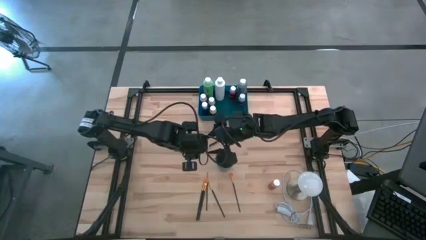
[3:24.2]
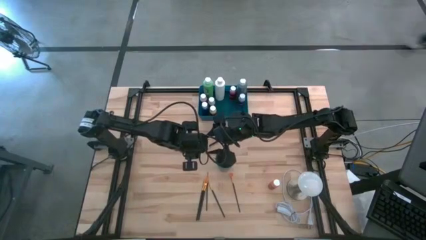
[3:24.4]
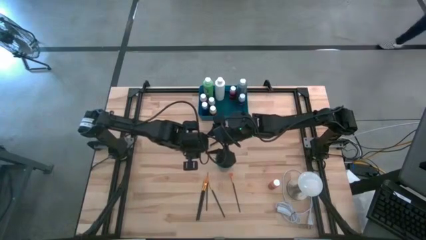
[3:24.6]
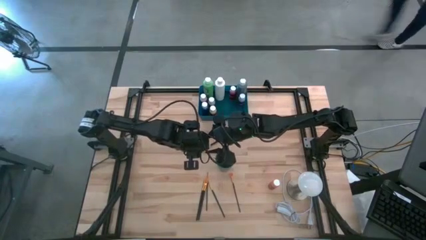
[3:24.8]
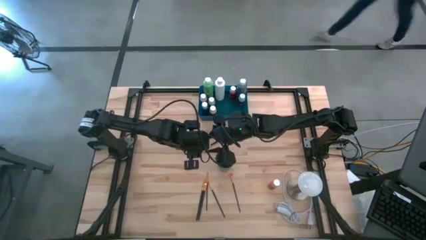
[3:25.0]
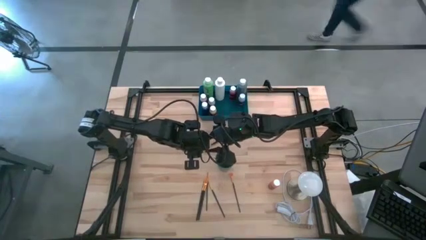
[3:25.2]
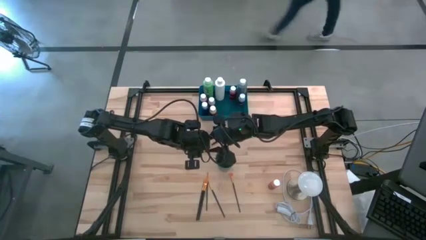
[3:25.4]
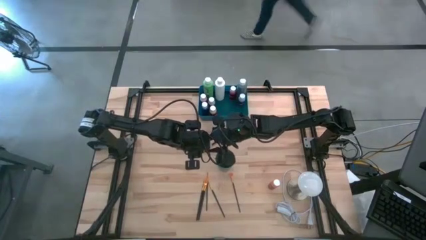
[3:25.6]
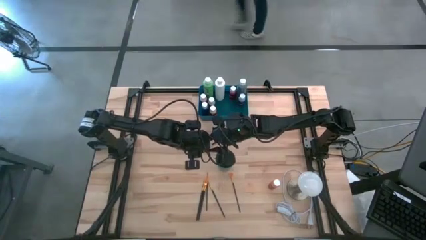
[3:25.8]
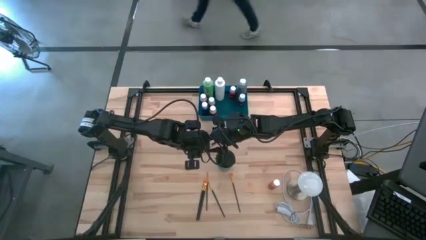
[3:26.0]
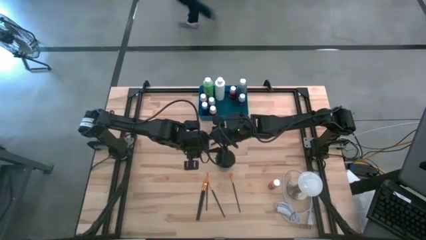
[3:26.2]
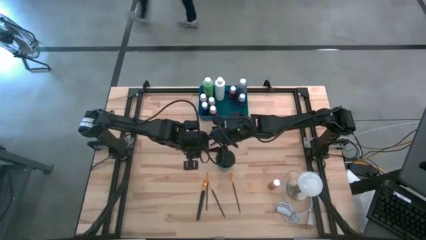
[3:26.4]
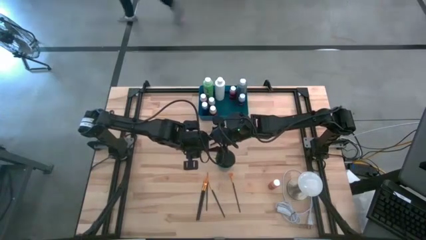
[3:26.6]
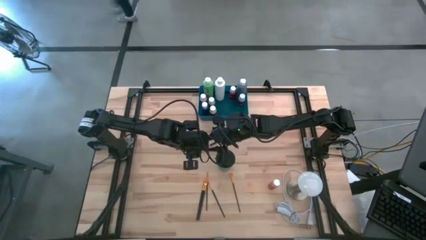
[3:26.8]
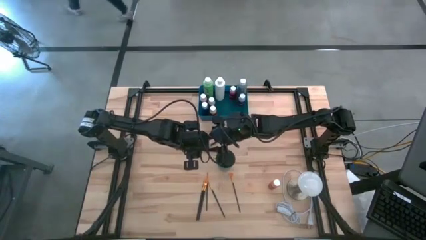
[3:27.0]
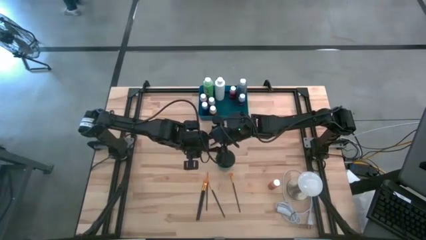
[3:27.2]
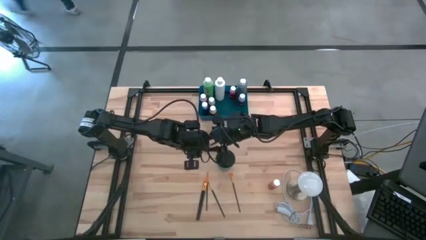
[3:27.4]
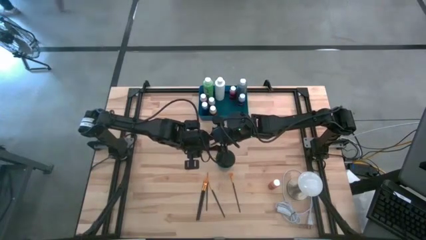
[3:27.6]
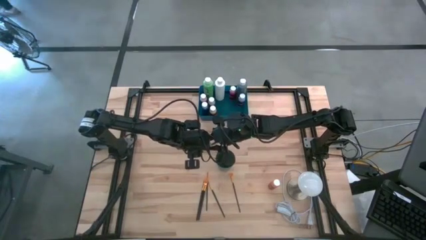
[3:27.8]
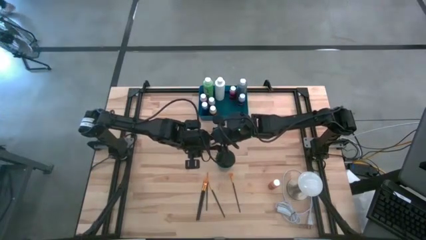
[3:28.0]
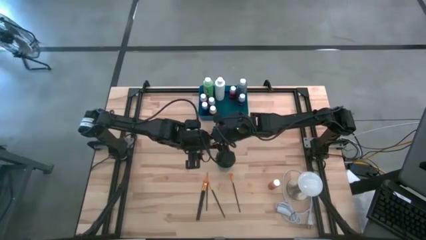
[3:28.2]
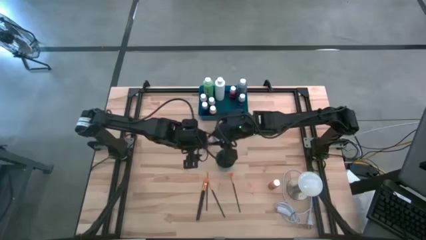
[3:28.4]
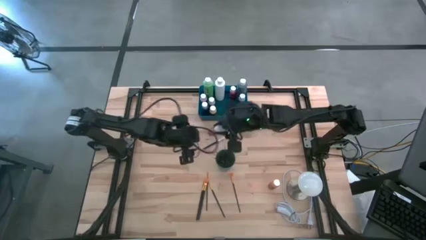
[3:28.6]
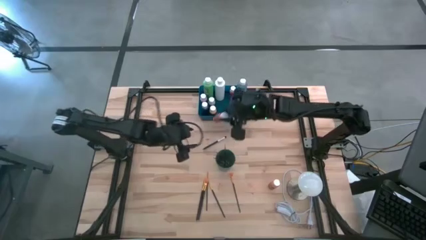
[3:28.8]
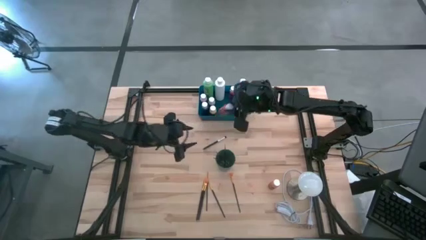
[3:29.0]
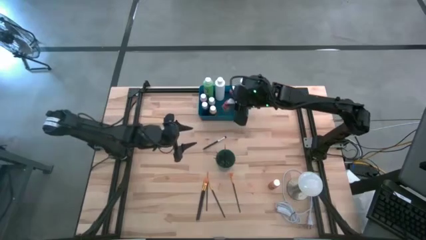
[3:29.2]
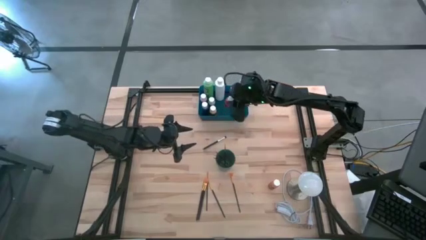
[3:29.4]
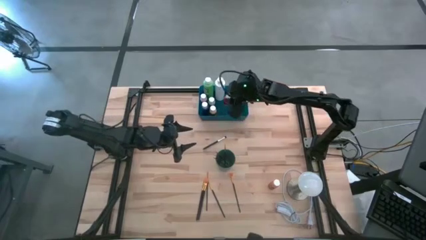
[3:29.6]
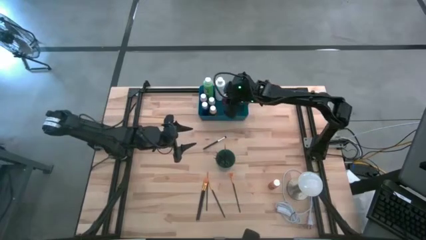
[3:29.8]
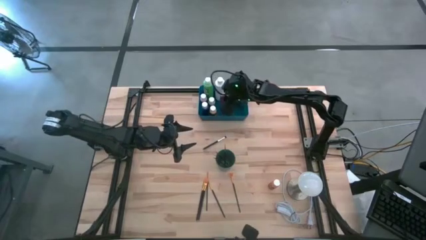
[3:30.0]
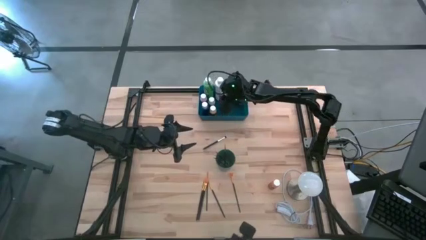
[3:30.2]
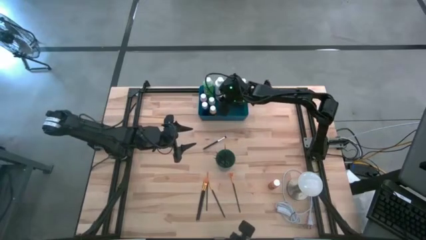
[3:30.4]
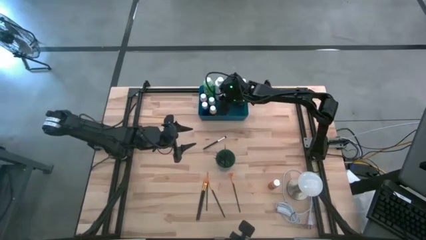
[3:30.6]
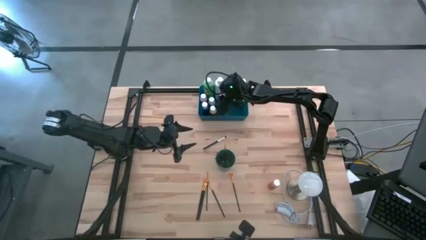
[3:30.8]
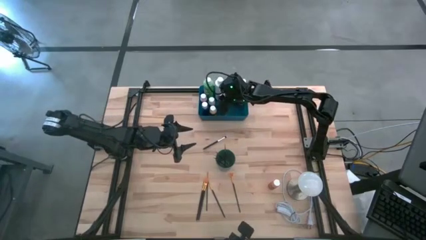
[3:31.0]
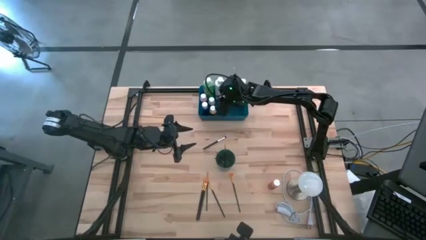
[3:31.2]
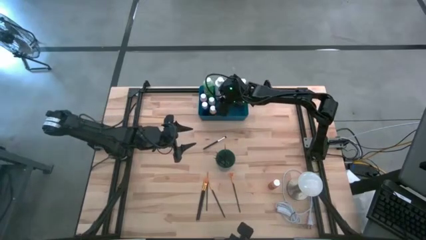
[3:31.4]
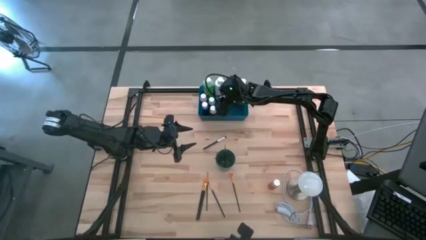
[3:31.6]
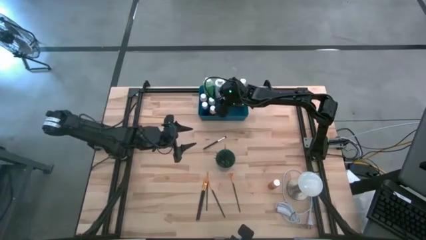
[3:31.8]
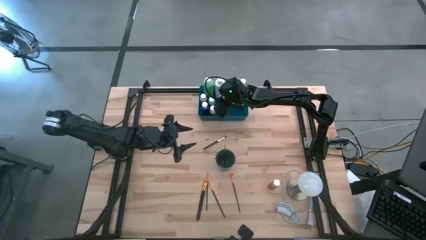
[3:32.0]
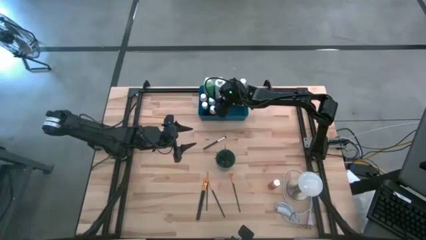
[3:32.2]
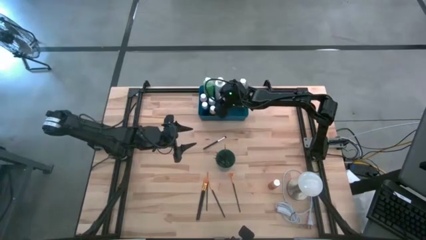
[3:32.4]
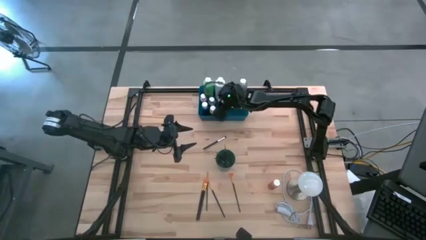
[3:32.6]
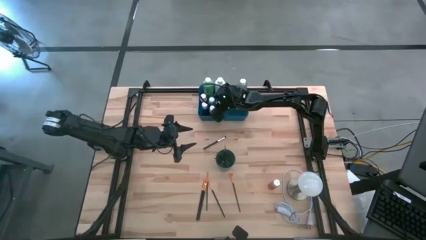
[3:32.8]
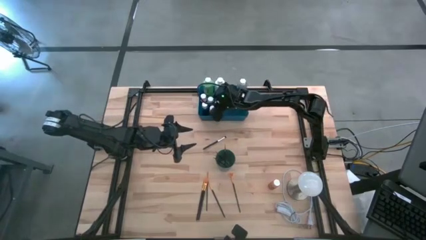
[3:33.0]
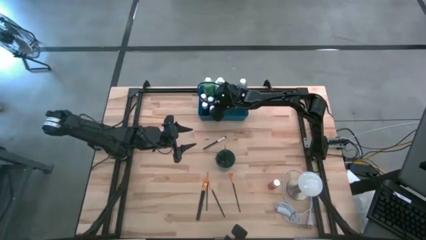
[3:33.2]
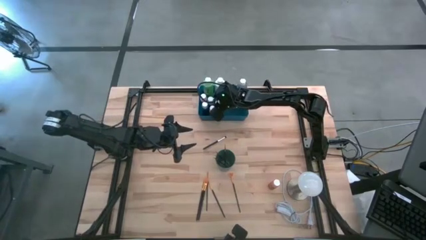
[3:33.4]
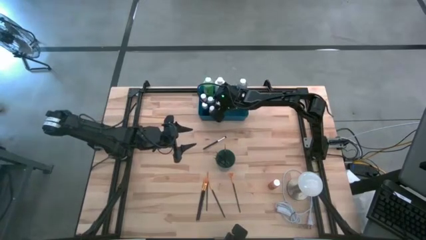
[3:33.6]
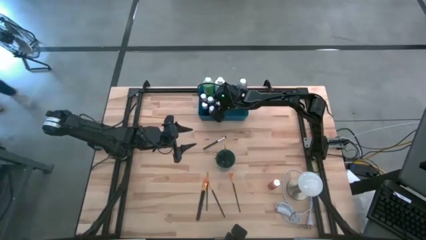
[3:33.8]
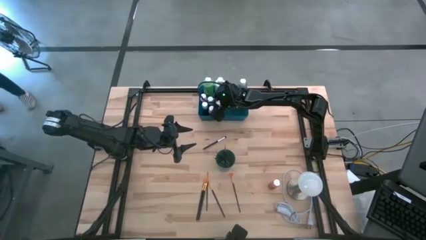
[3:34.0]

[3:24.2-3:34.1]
Task: Pick & Place Paint Supplies
Put the orange paint bottle into the blue bin
